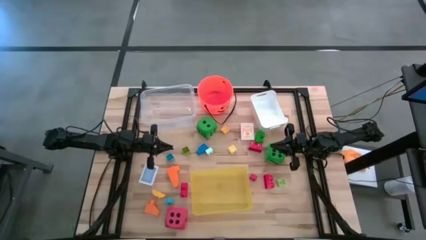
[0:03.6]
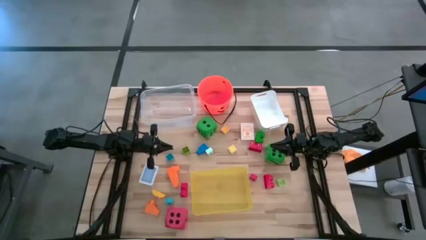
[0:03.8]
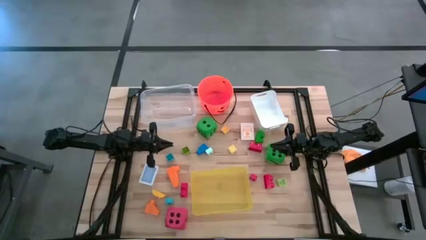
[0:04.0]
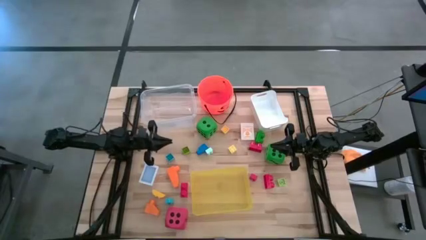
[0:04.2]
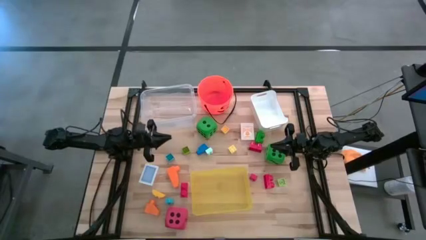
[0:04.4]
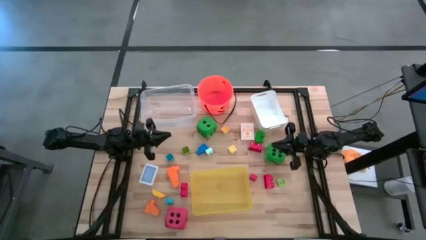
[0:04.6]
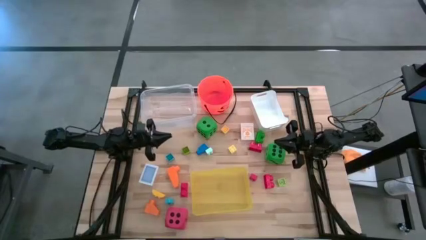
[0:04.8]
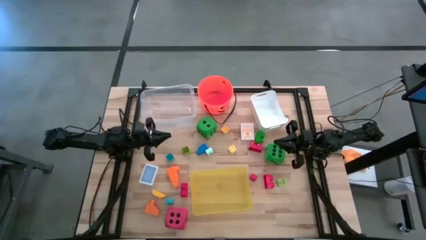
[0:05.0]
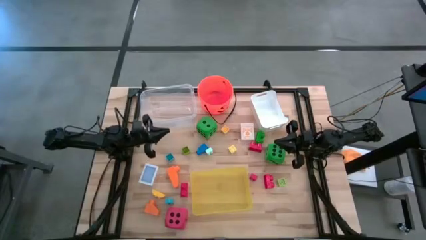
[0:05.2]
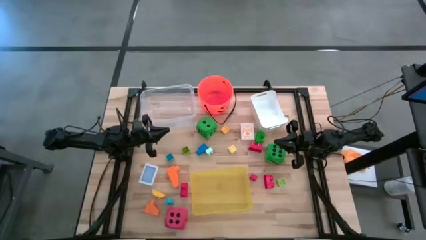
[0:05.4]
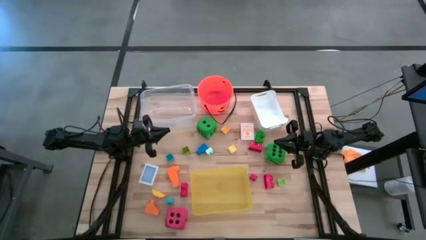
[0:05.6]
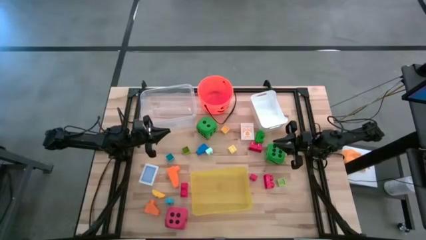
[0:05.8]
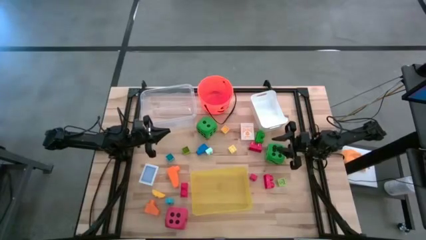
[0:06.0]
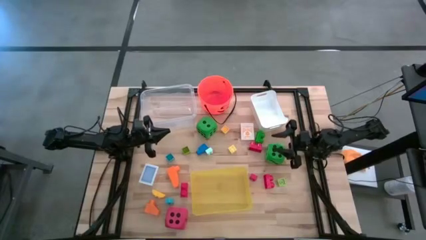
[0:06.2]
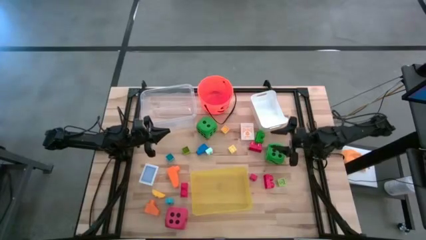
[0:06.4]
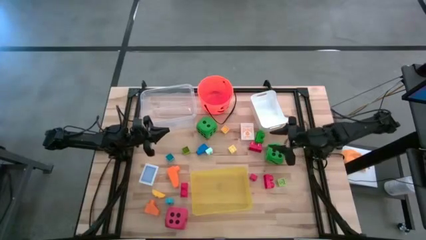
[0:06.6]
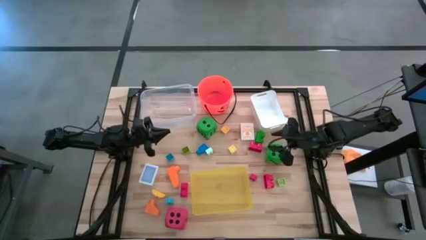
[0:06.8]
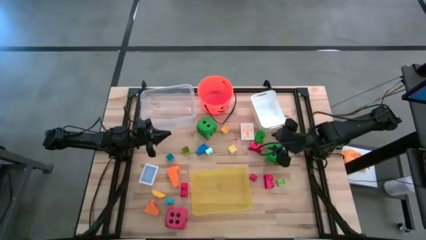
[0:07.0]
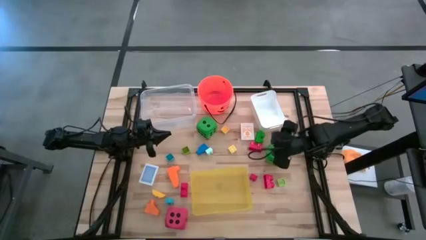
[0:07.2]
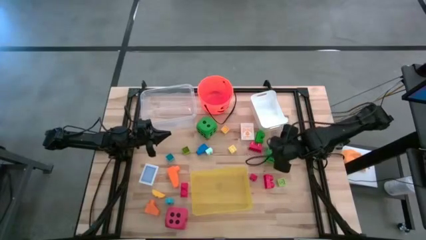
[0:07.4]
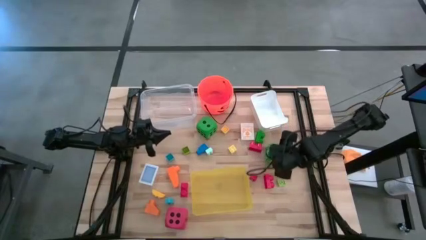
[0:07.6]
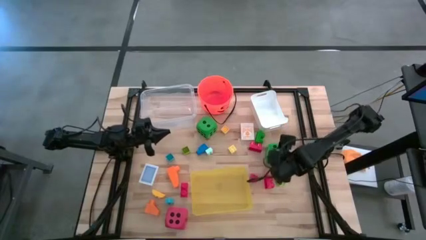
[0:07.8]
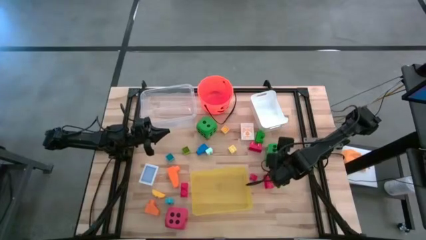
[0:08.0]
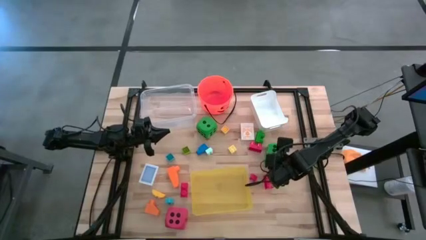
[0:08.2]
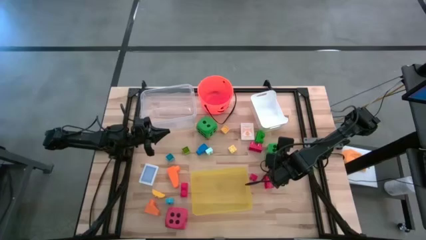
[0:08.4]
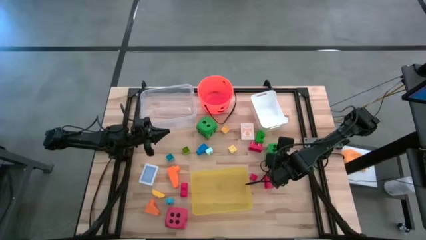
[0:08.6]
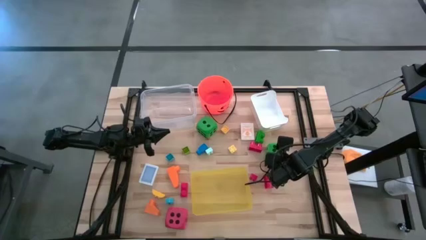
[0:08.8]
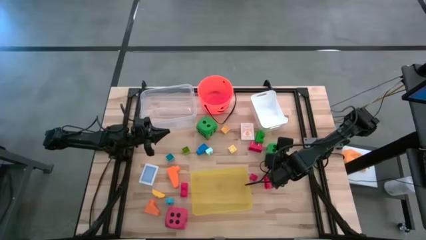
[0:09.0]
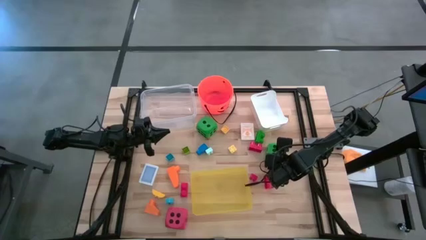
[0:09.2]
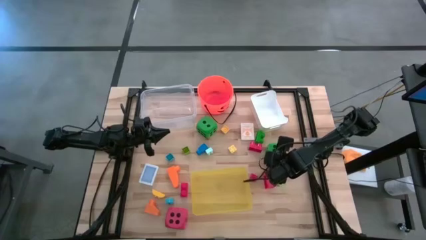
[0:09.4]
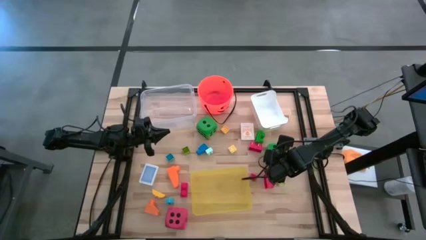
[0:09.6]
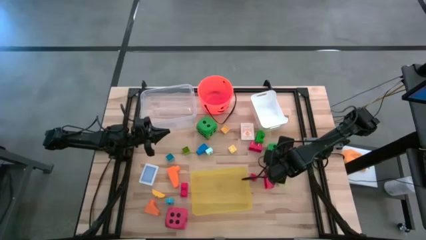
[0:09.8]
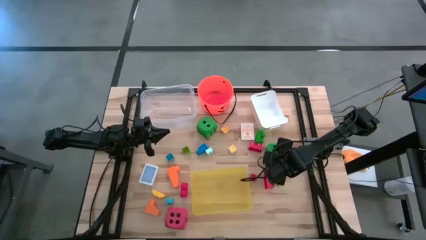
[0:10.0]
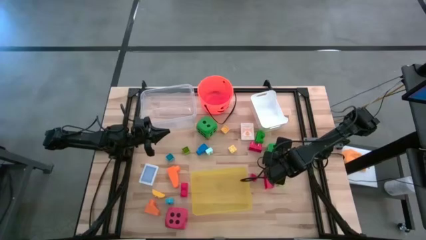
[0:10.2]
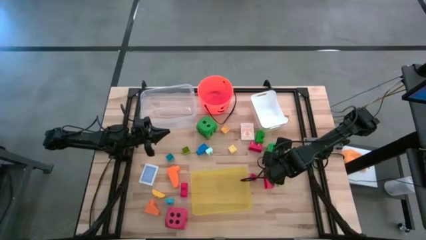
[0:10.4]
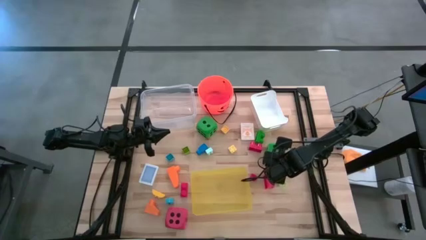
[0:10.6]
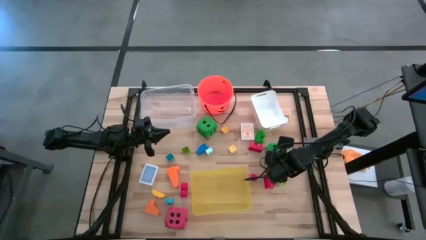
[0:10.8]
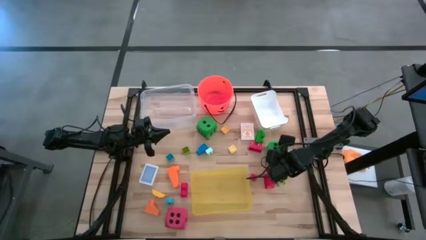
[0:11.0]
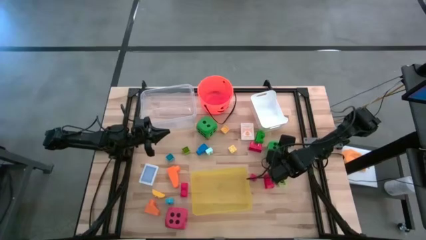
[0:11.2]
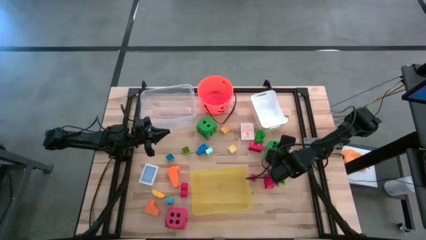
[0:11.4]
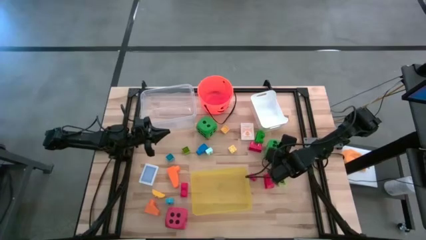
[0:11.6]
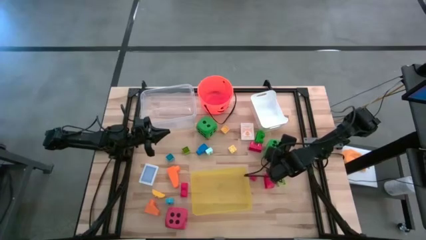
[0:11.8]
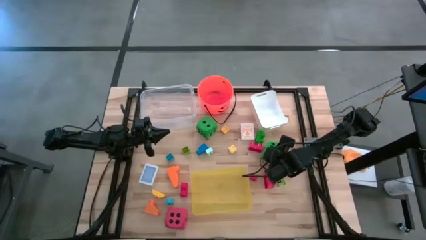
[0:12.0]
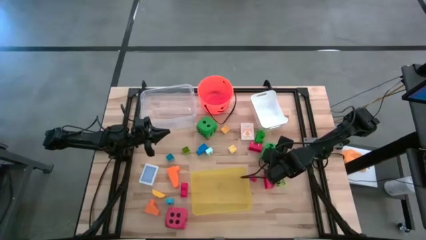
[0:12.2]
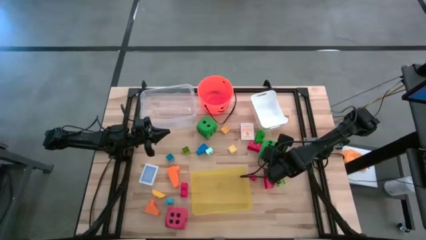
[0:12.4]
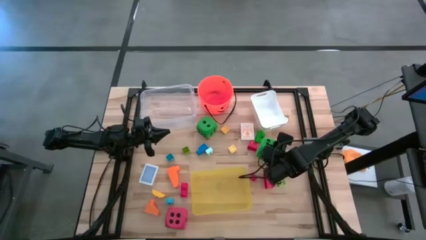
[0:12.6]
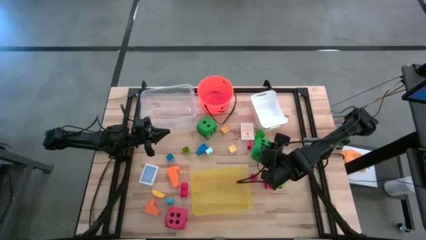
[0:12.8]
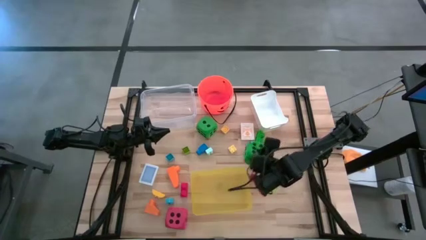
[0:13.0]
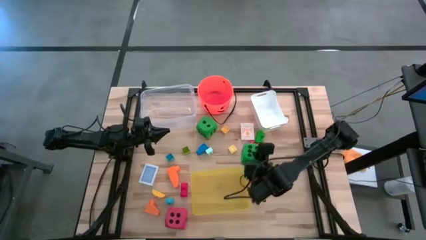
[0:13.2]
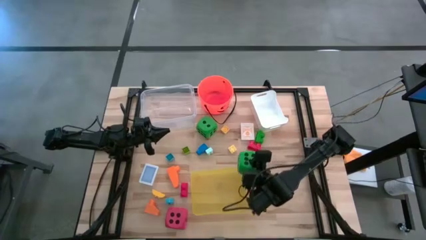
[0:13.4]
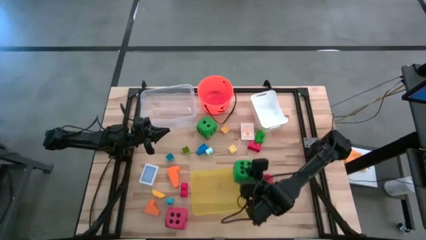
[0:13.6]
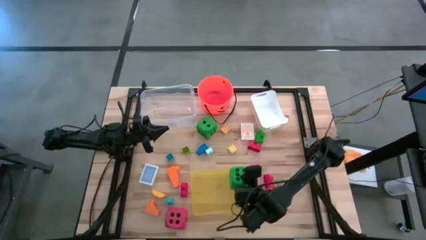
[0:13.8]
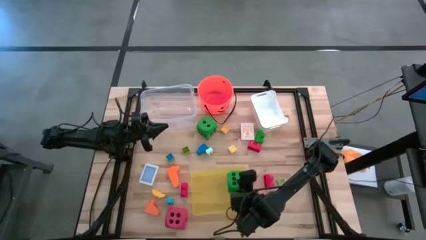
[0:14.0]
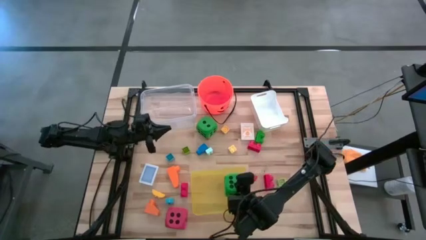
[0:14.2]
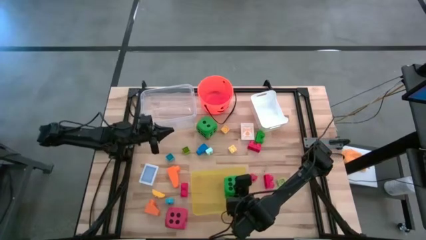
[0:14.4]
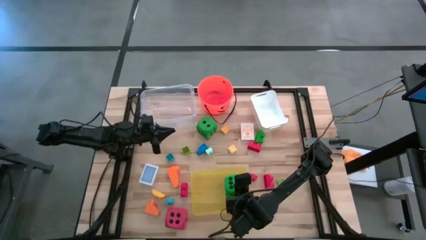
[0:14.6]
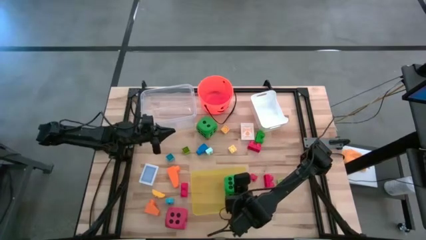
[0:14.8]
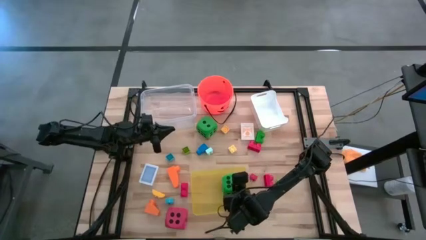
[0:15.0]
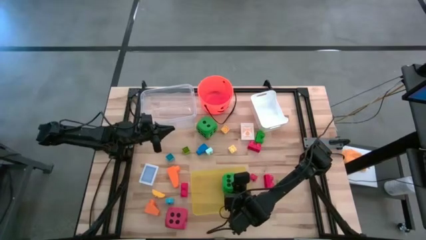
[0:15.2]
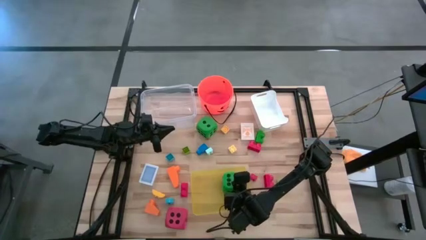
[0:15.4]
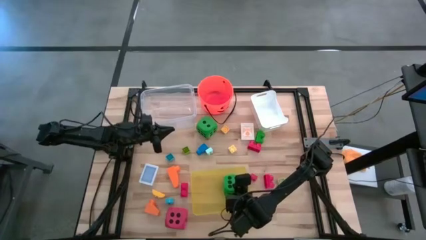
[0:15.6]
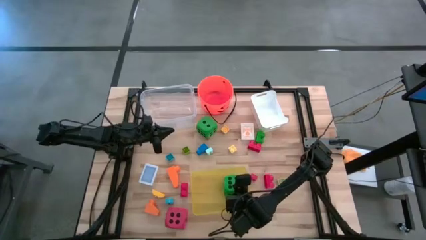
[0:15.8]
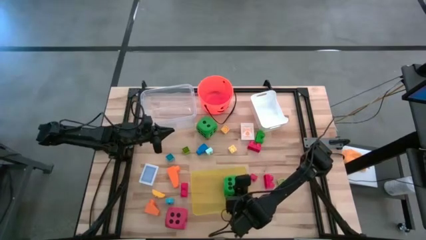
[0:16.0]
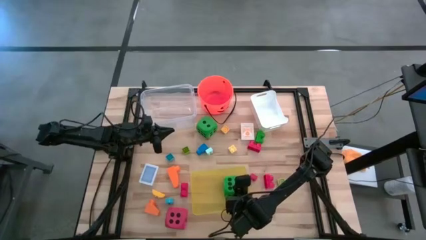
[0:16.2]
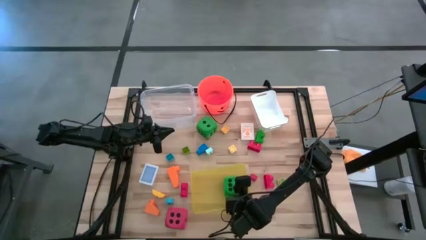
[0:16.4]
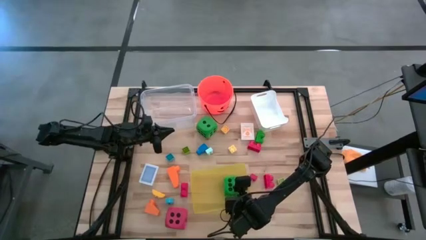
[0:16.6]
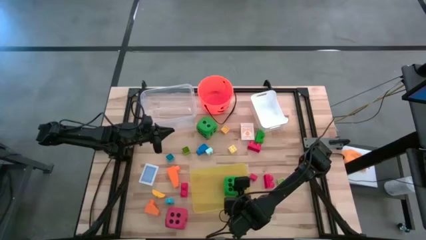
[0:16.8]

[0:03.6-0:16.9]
Task: Pick & Place Toys
Put the green die into the yellow bin
